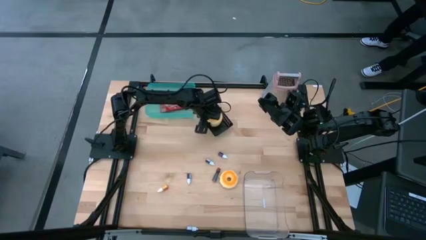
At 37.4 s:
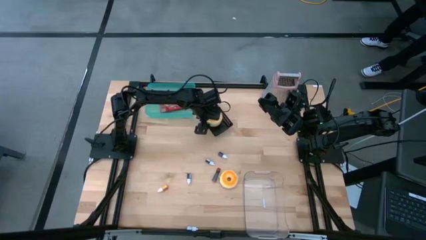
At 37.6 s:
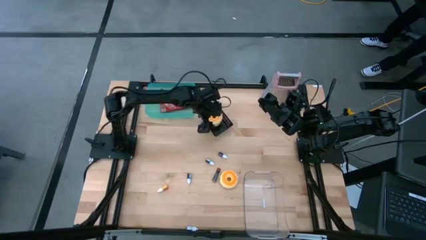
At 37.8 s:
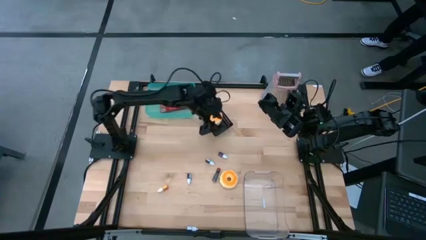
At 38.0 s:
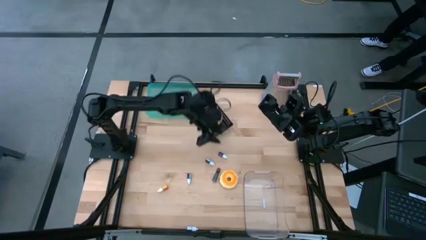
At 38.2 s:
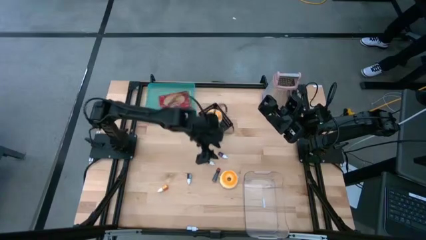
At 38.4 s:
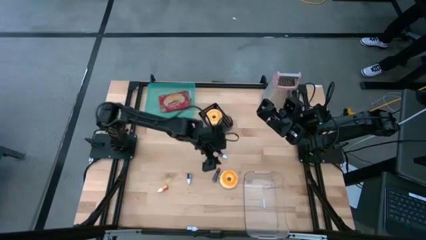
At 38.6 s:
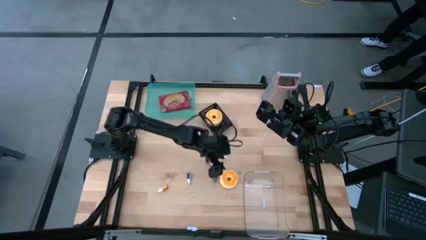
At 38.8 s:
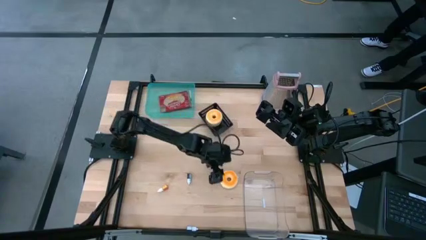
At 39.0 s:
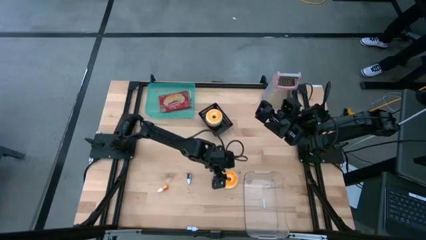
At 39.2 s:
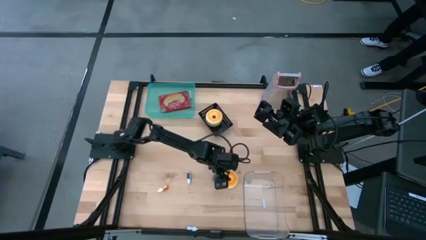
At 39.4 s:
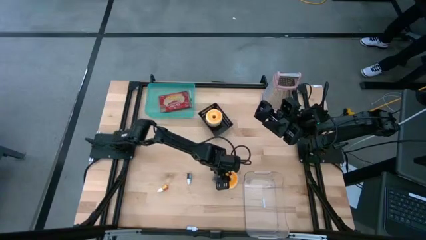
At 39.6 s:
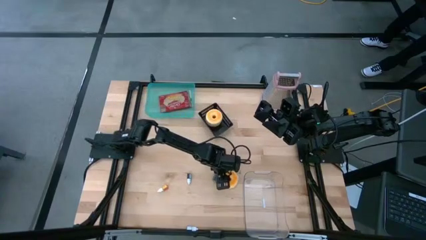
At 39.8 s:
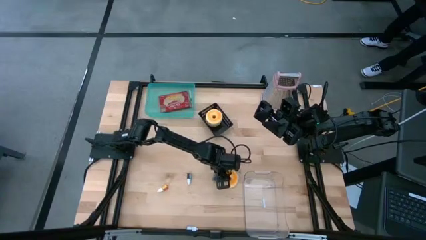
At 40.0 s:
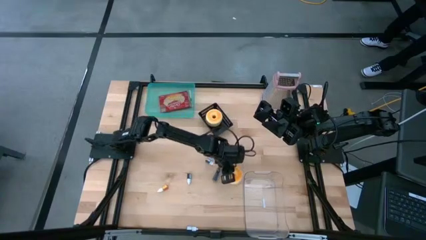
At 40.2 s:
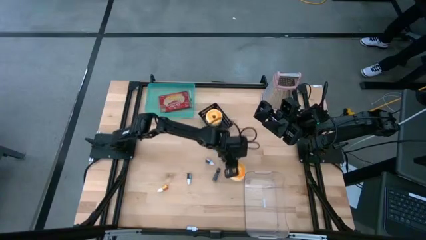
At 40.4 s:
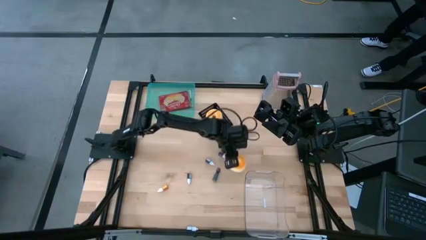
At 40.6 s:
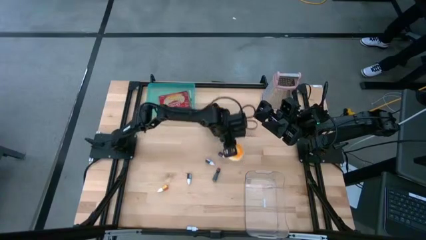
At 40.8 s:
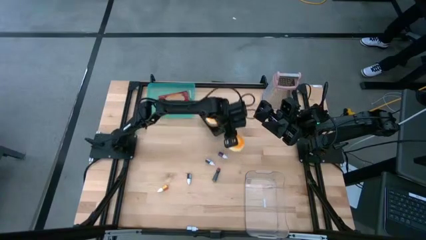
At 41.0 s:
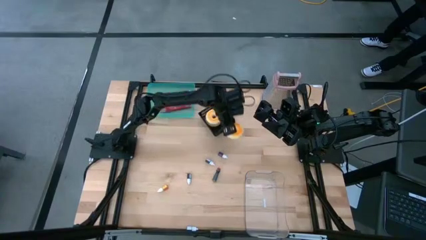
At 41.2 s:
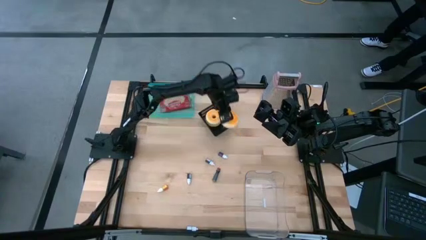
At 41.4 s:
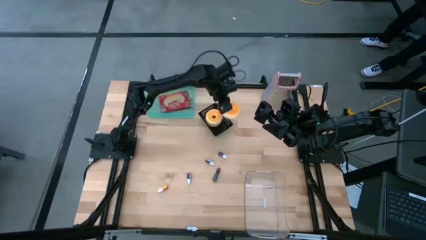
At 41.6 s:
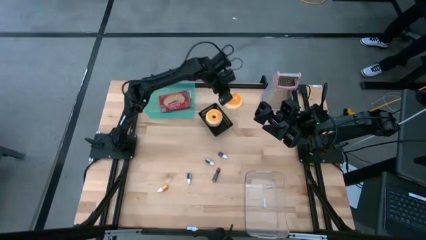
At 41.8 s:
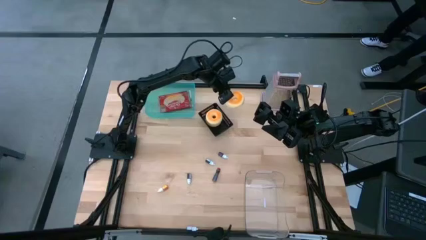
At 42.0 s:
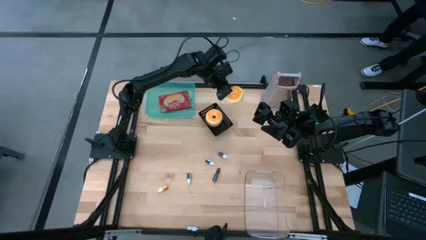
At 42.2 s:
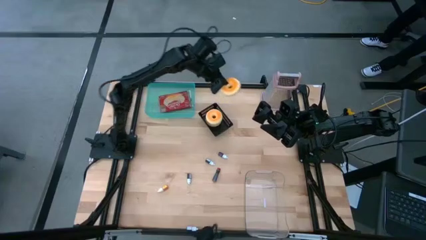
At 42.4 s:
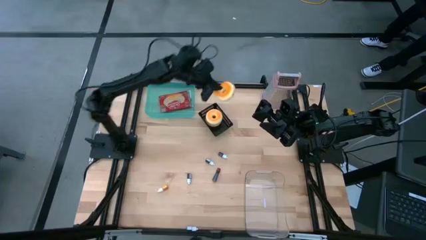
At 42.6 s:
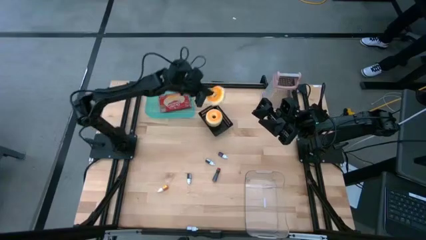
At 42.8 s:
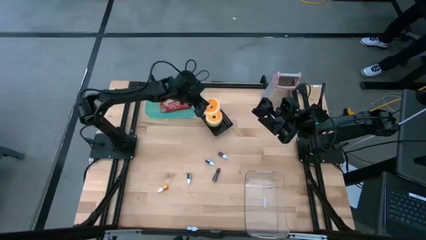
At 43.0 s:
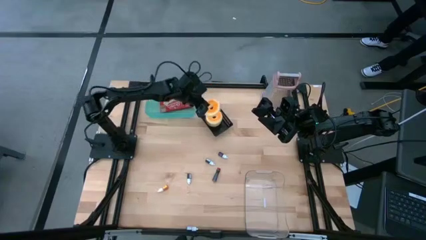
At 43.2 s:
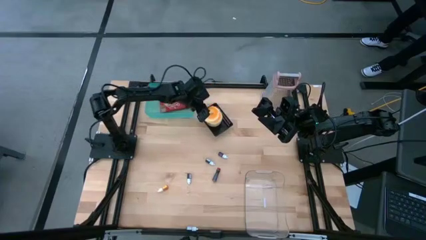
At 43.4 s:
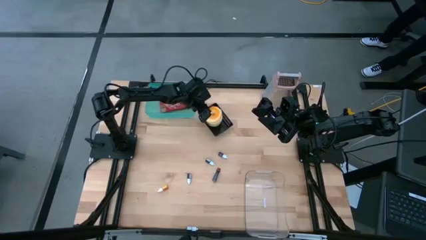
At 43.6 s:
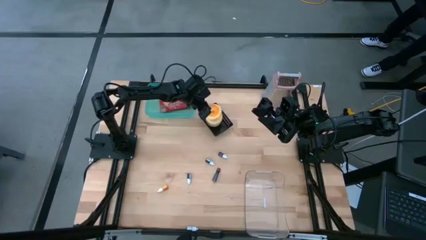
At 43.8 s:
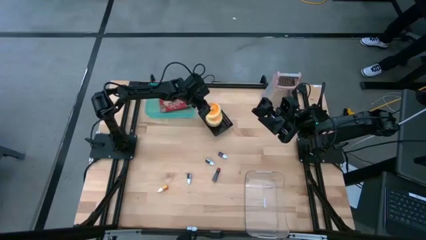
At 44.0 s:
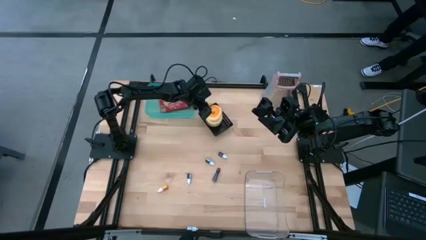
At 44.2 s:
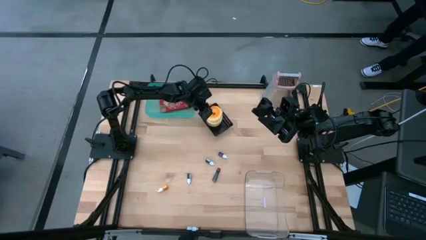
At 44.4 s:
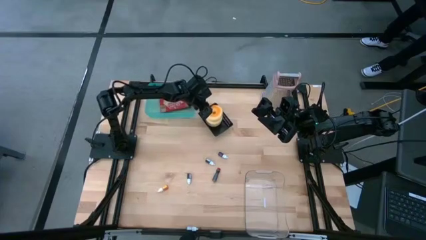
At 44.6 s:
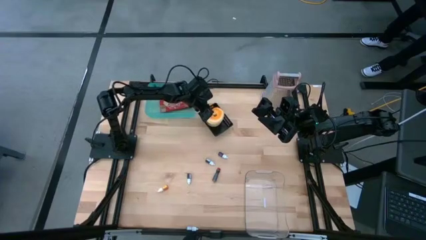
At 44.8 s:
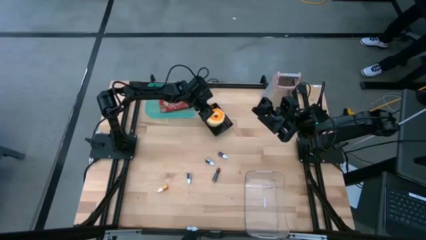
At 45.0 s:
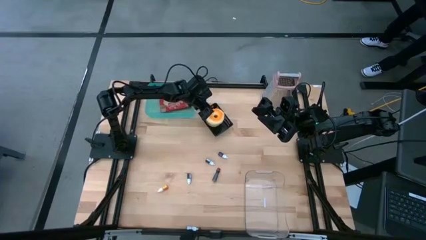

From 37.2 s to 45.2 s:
Put the white donut into the black bin

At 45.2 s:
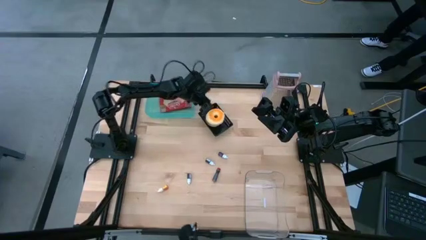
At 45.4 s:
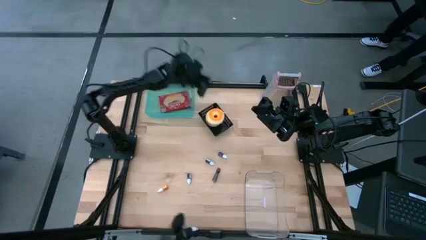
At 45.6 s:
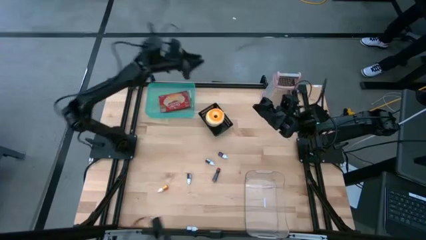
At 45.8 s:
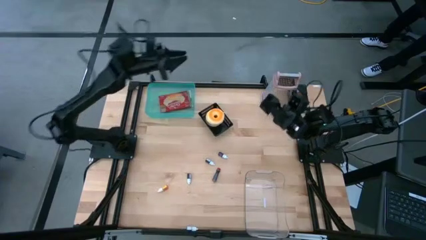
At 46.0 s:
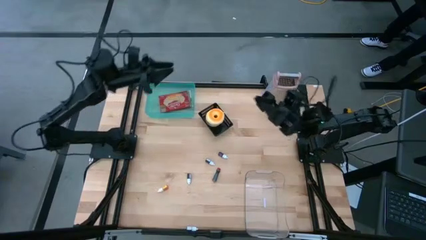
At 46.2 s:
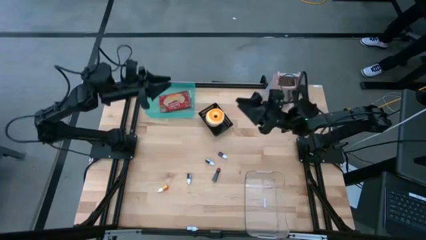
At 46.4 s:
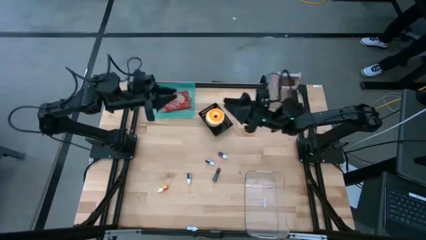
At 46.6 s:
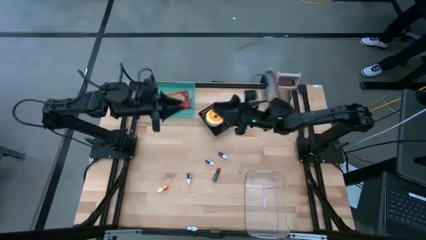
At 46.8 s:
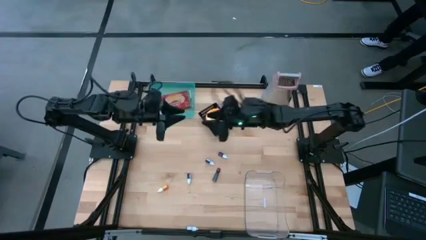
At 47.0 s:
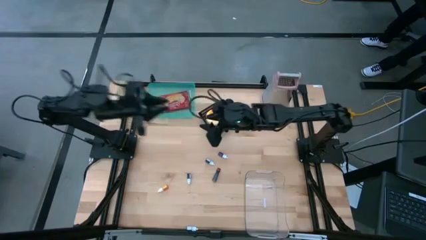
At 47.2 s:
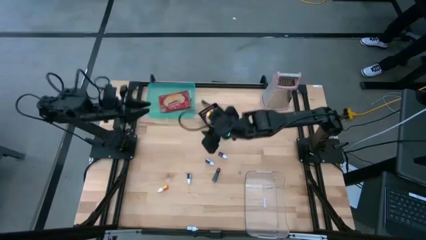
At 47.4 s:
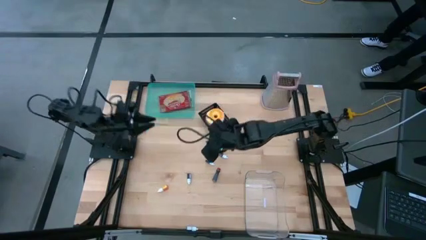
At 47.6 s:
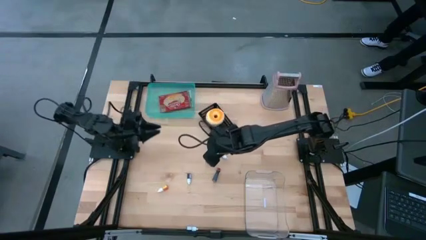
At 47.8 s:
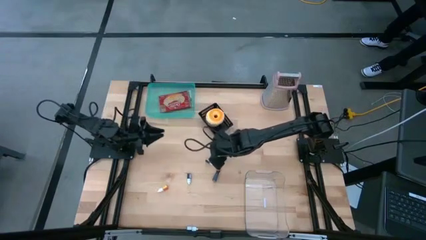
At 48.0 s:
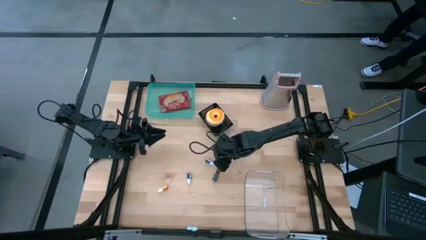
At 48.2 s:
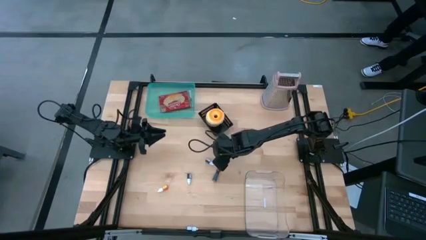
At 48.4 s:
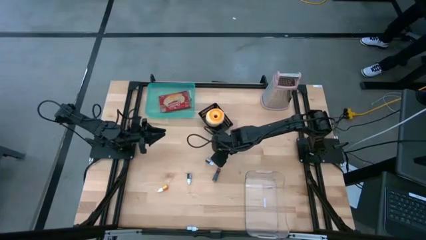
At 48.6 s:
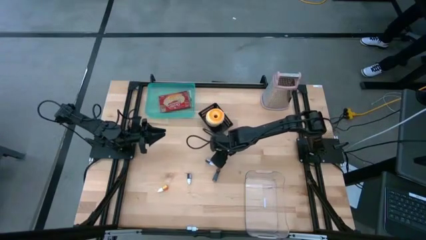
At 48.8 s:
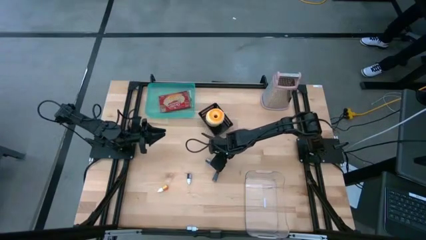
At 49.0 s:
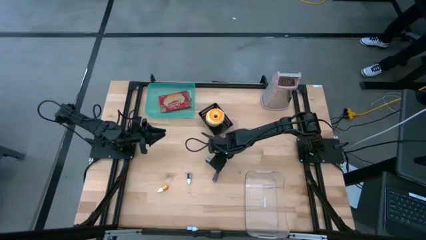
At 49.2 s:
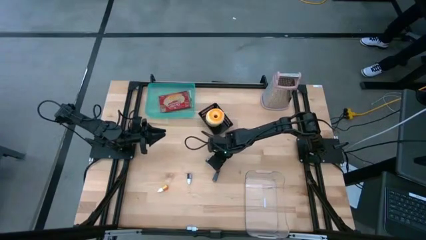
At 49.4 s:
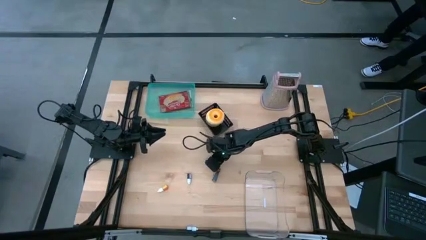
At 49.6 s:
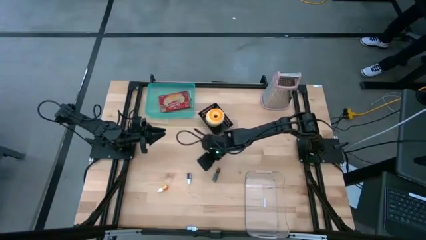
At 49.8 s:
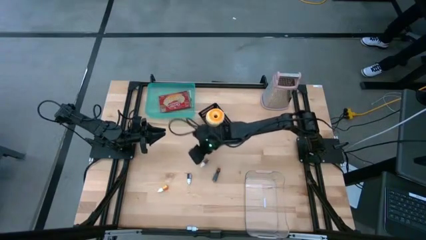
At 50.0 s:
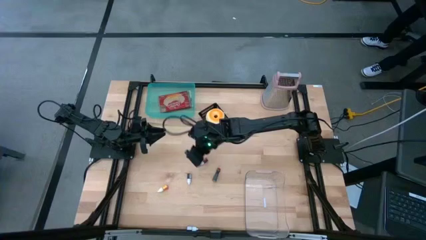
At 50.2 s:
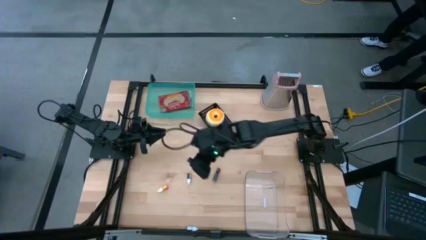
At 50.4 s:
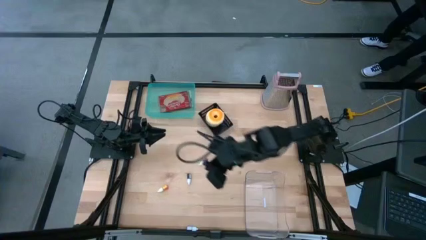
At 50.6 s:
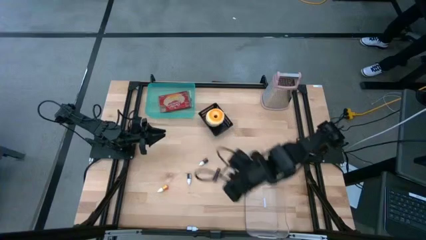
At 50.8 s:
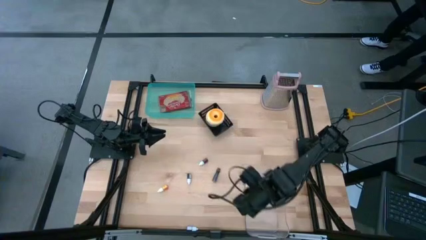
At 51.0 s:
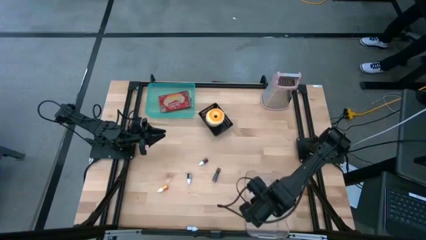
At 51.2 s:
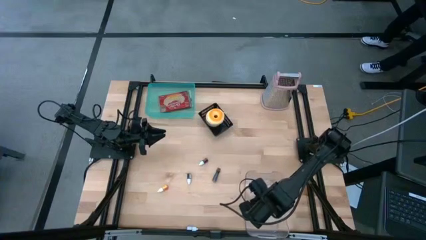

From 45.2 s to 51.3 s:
Put the violet food coloring bottle into the transparent bin

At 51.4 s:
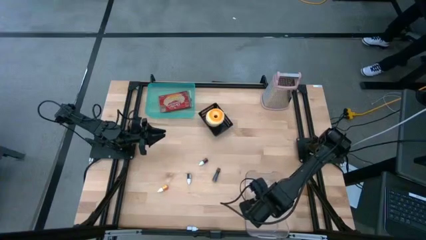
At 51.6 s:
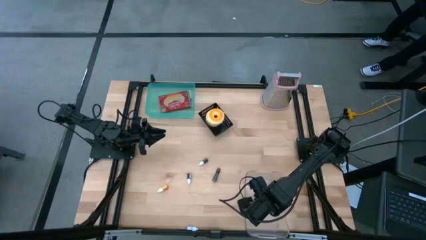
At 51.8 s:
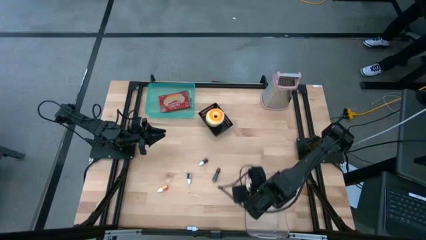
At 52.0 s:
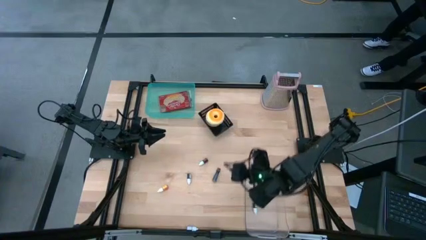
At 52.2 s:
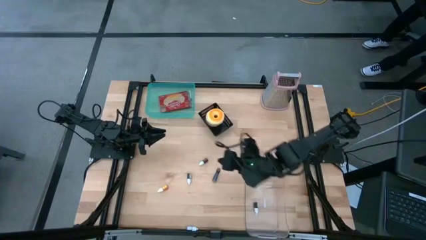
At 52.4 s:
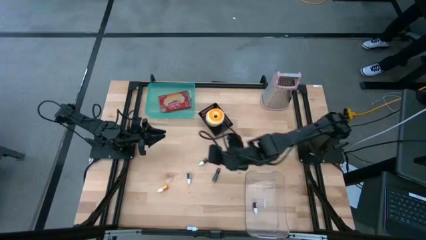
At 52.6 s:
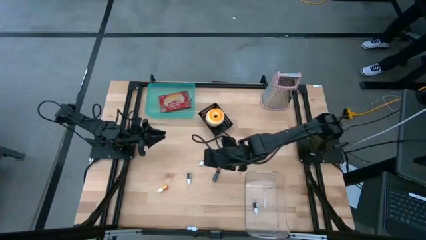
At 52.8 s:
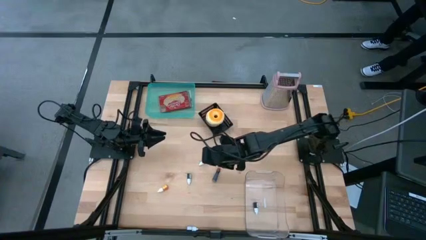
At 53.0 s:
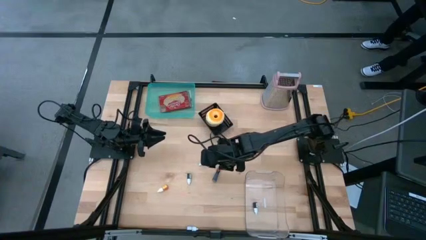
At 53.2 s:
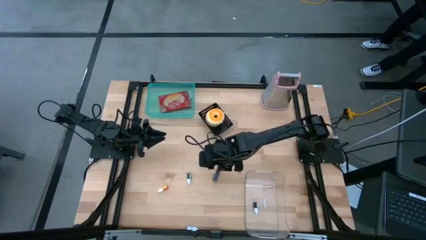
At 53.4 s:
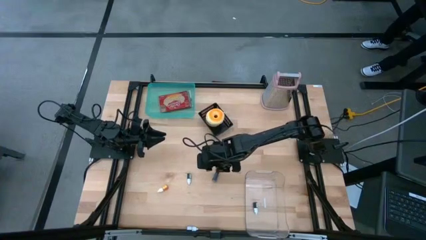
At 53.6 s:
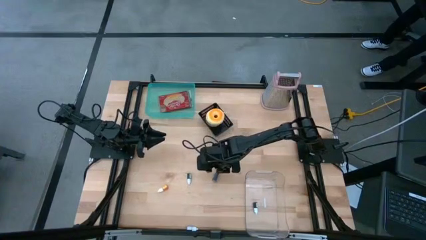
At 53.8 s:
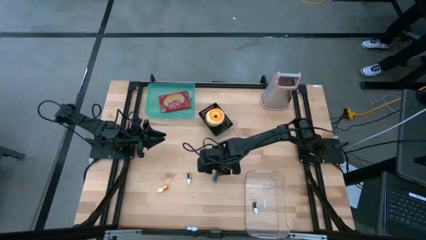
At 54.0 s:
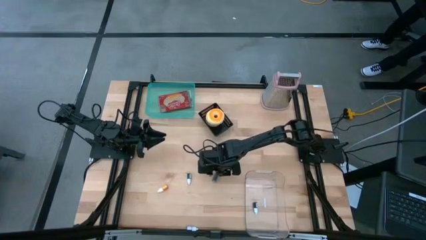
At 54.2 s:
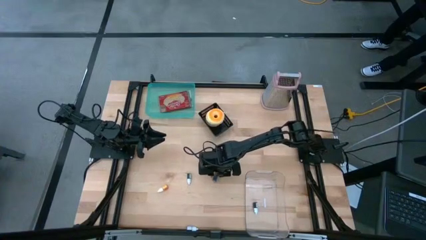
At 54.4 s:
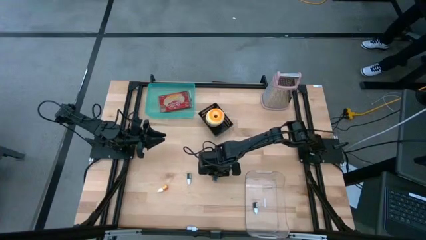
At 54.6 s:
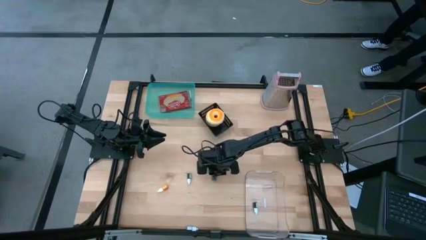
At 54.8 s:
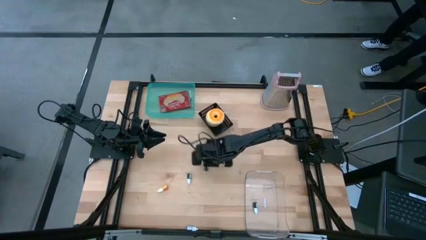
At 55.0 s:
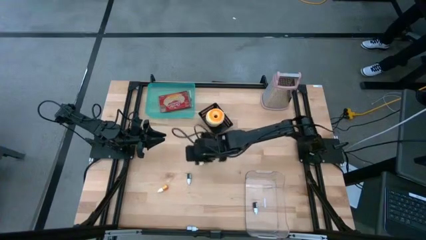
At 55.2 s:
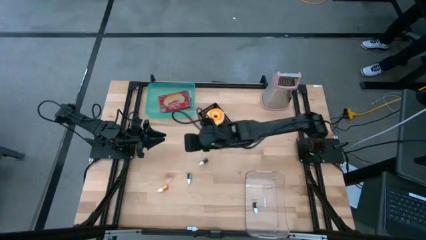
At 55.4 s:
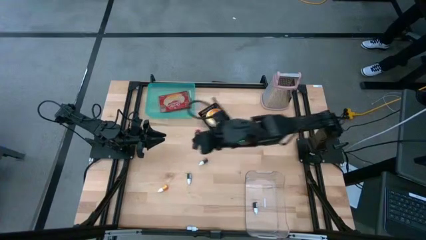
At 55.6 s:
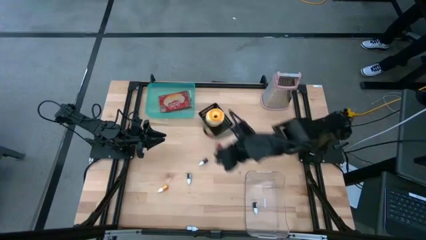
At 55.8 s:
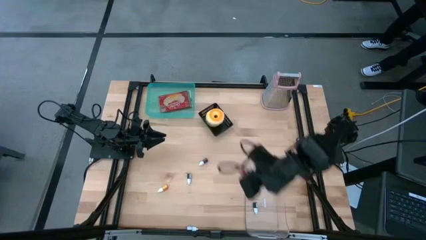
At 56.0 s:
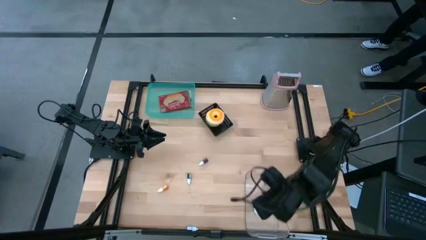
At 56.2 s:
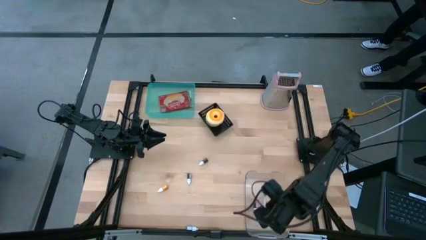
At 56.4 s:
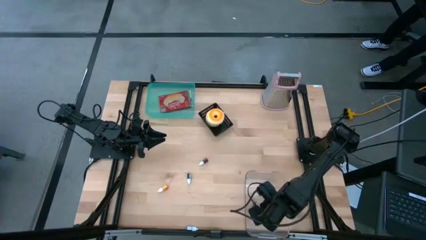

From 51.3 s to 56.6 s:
Put the black red food coloring bottle into the transparent bin
